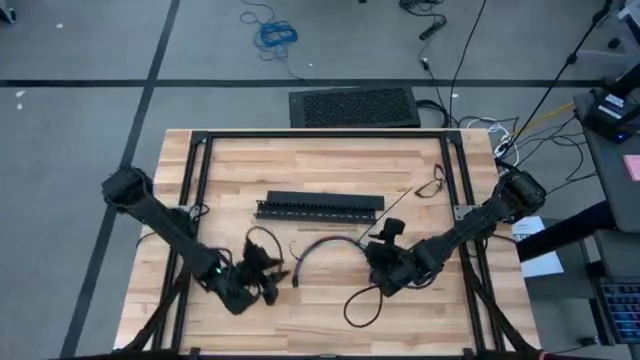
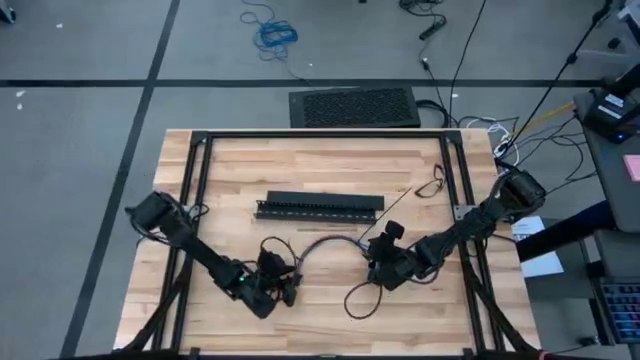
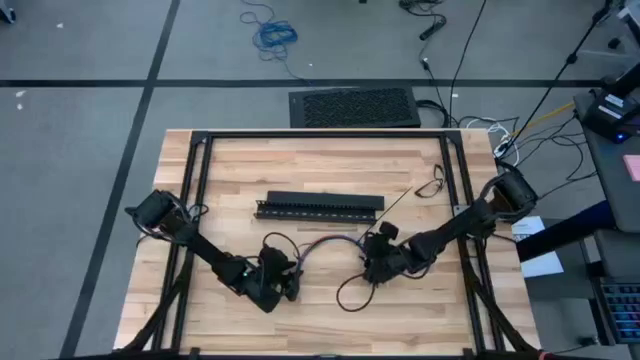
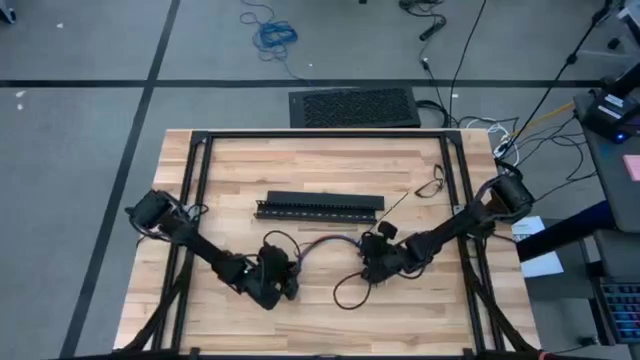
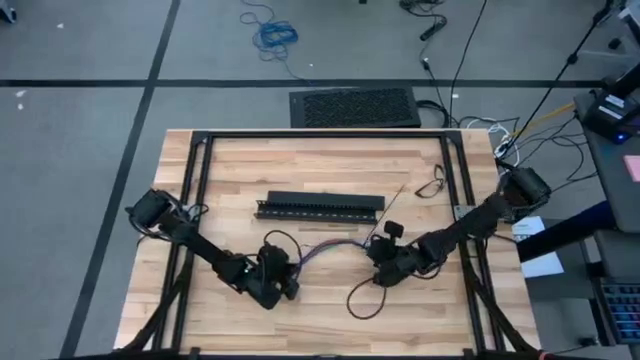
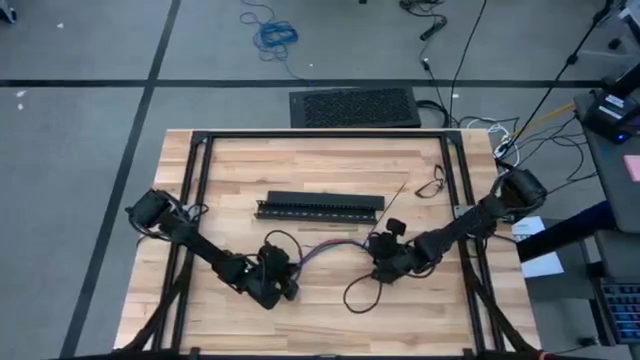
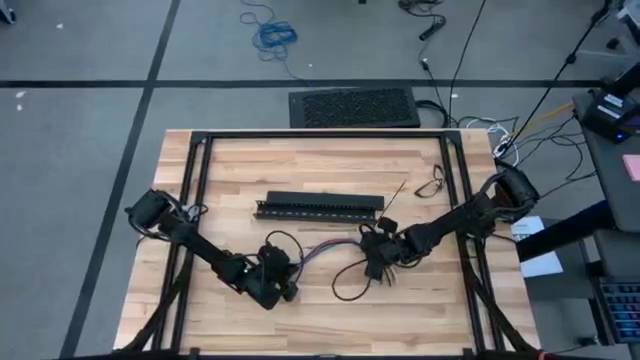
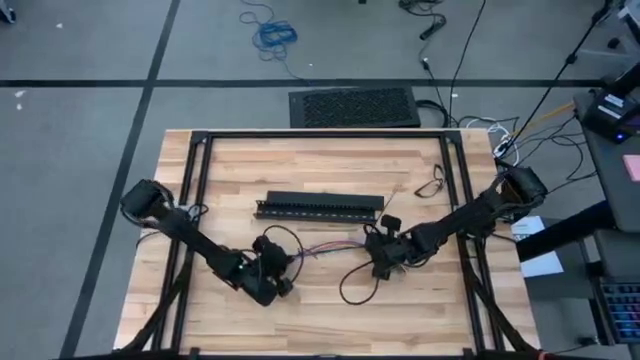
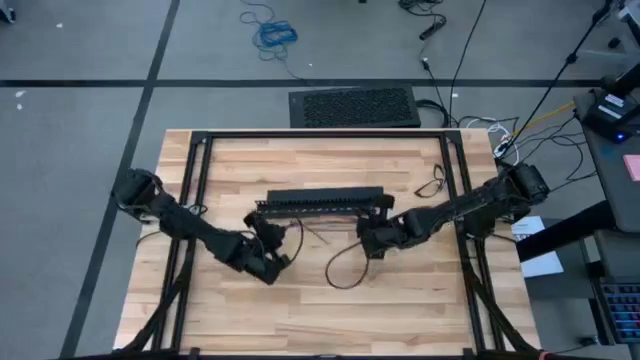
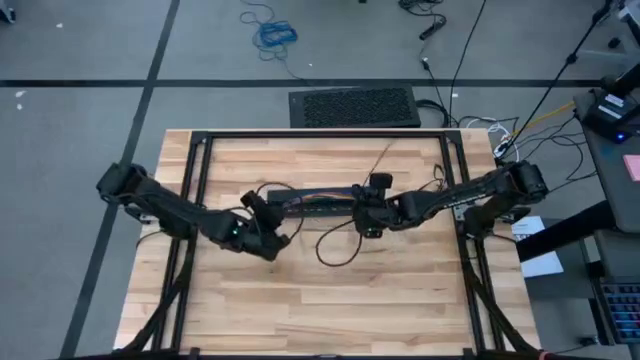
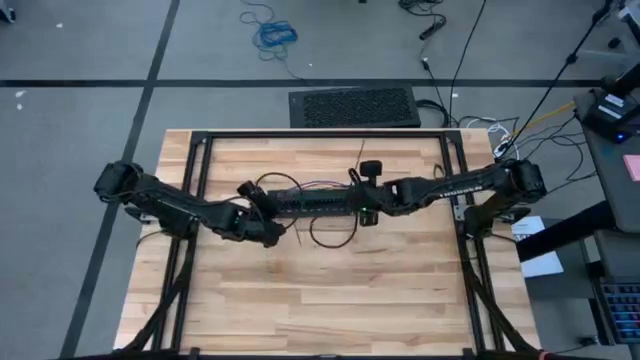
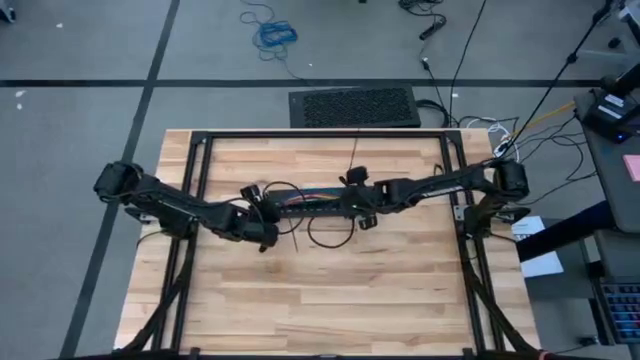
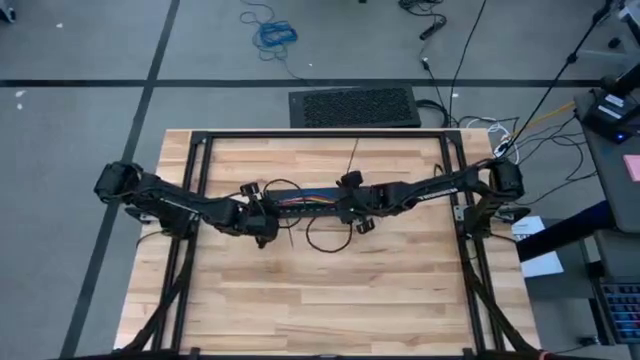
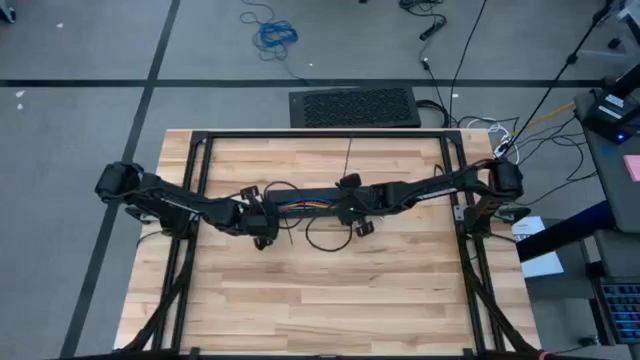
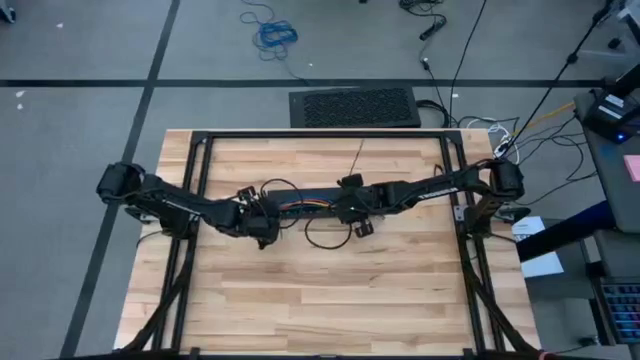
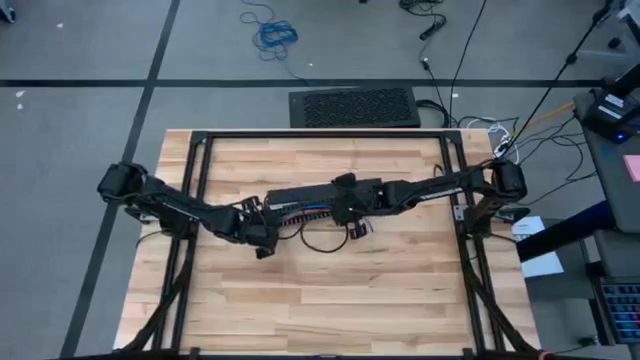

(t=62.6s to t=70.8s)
Task: Ziptie cables
Put the zip tied cables into the black cable duct

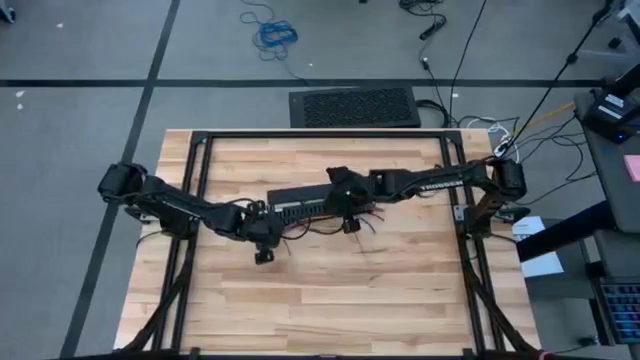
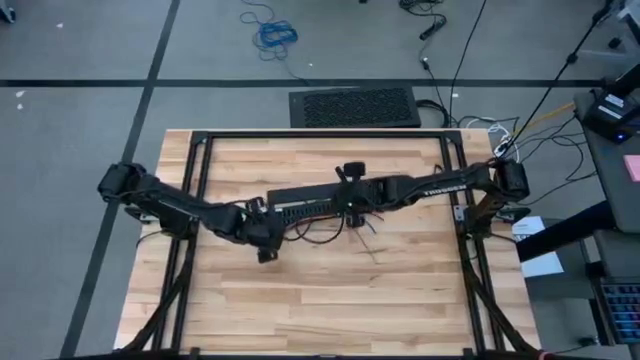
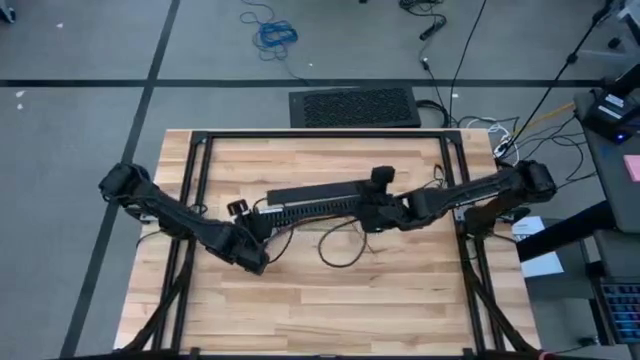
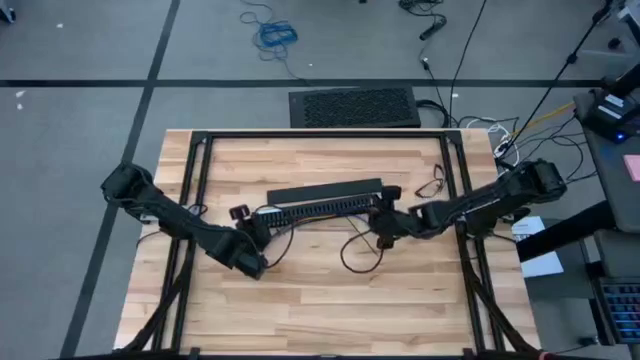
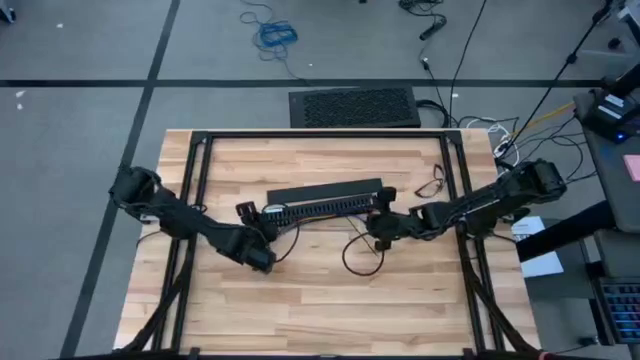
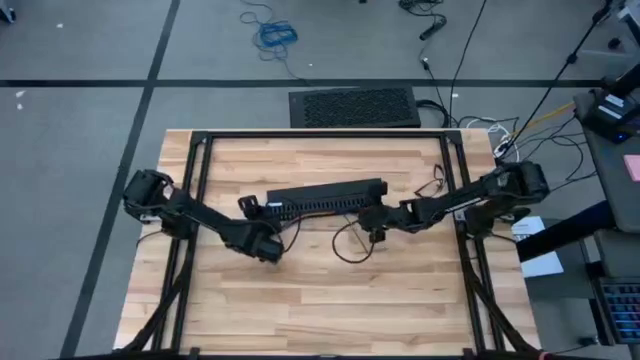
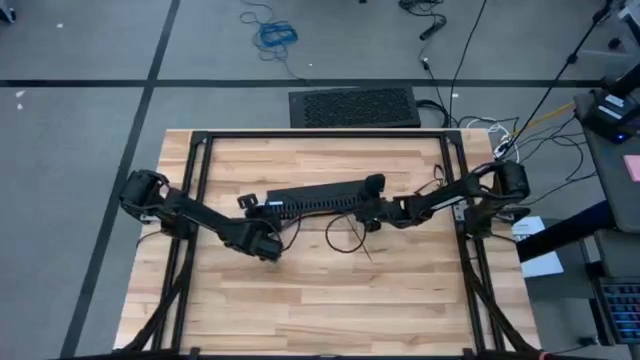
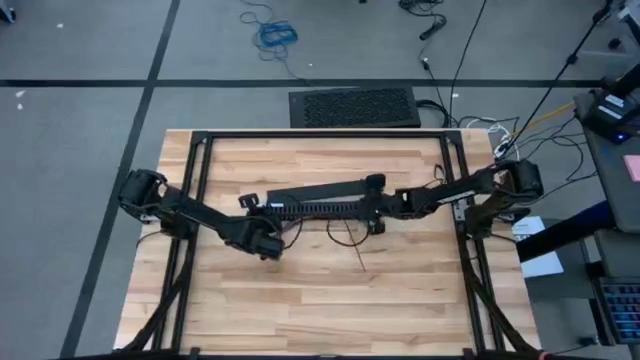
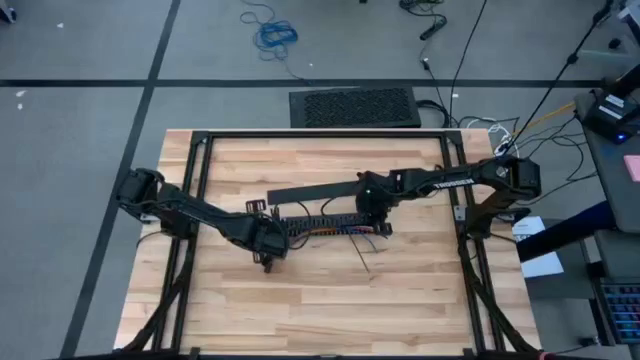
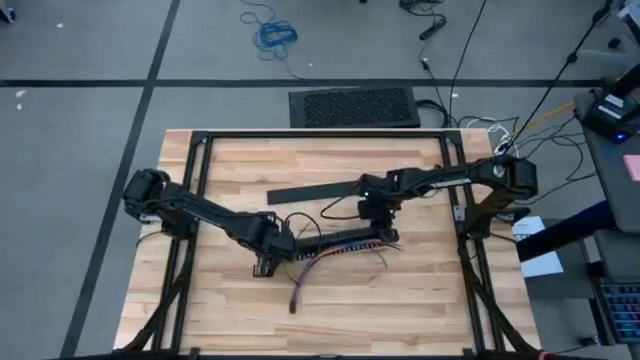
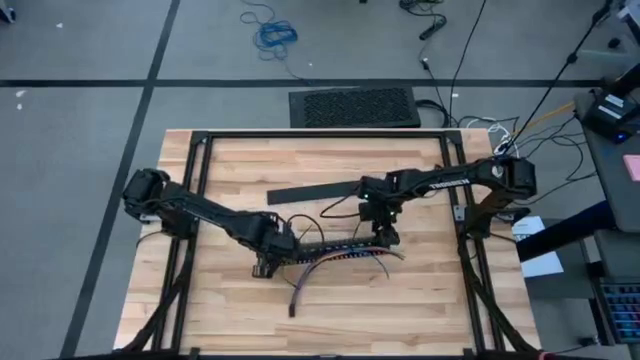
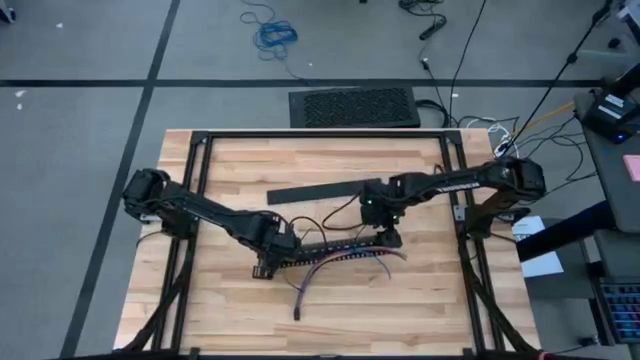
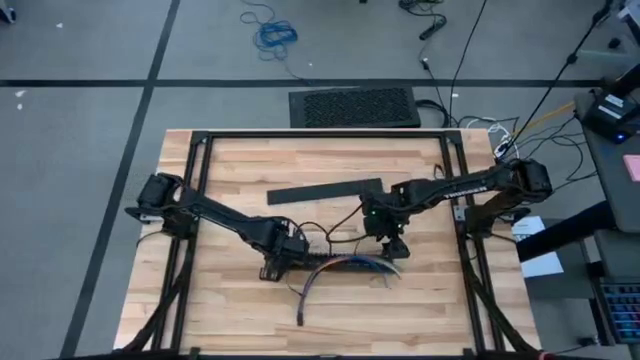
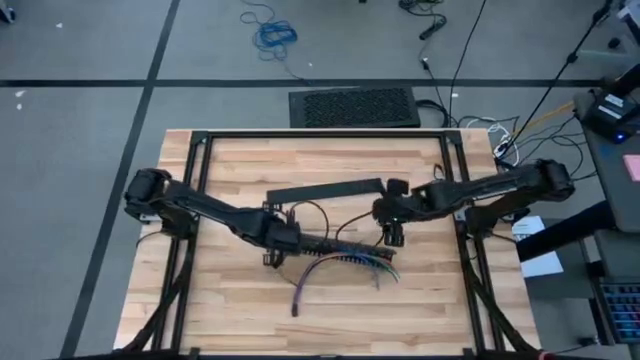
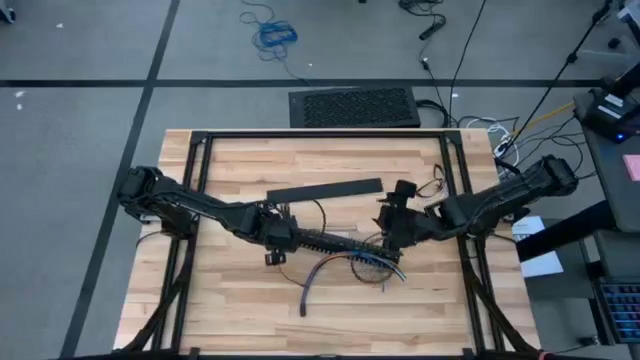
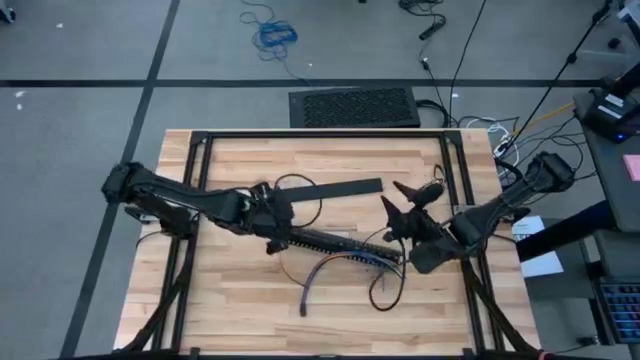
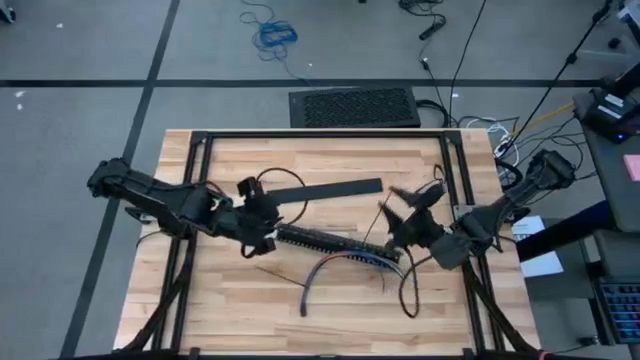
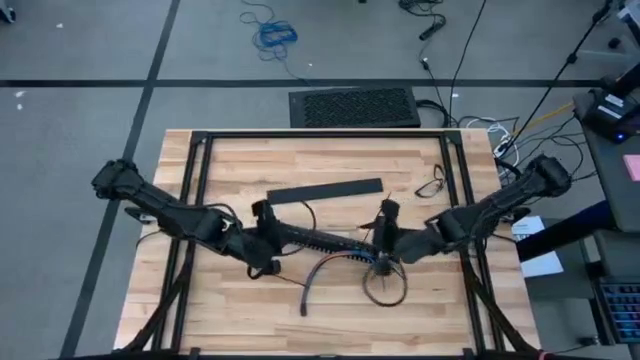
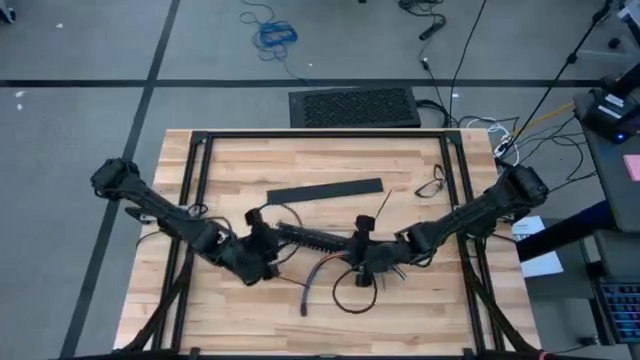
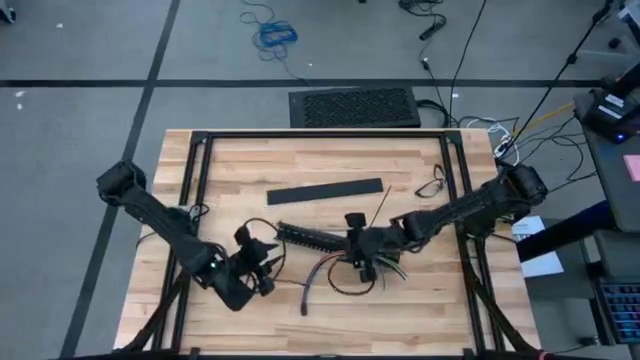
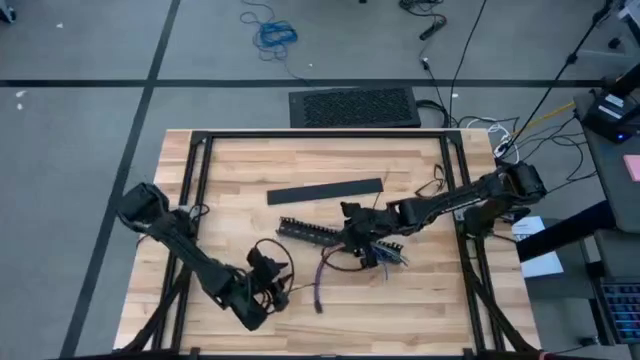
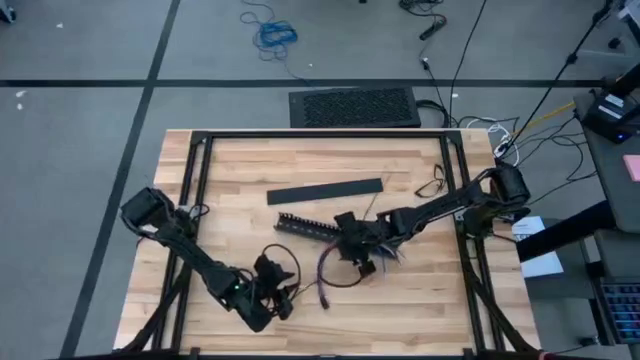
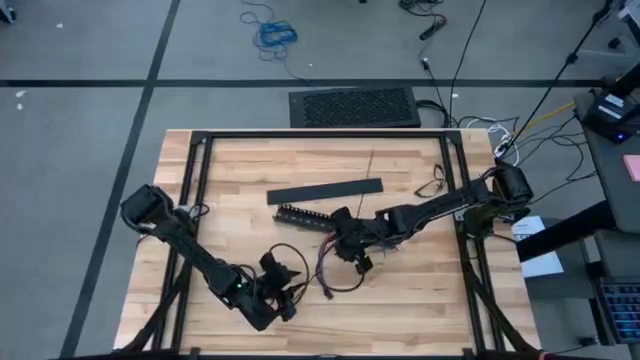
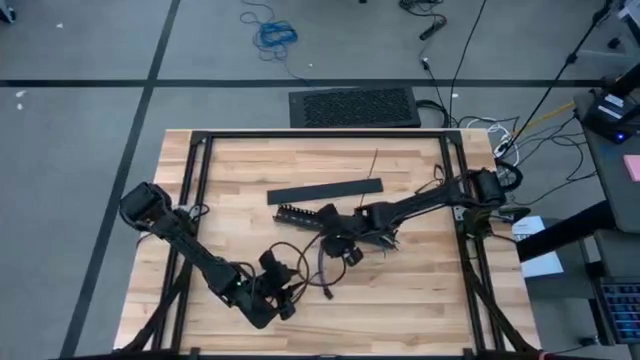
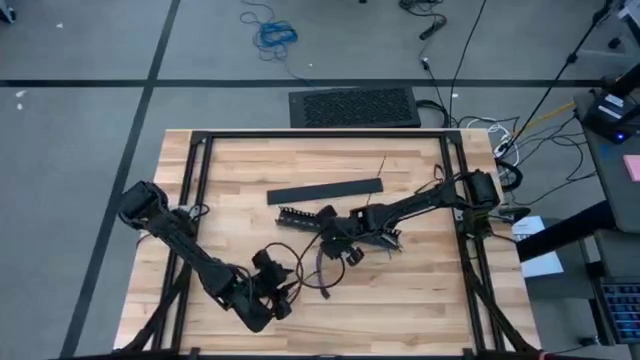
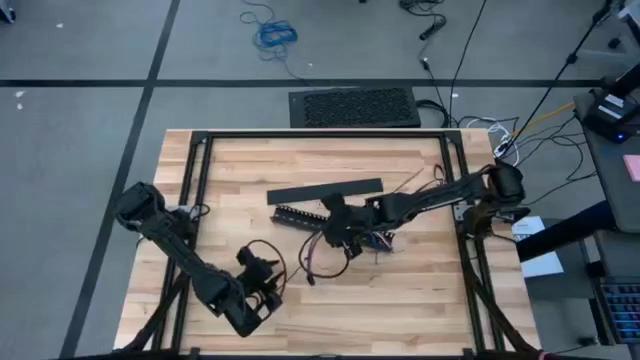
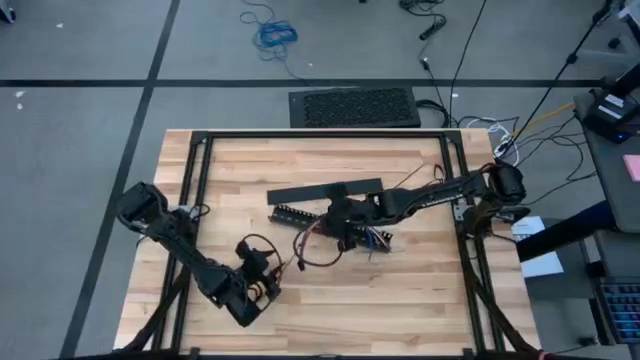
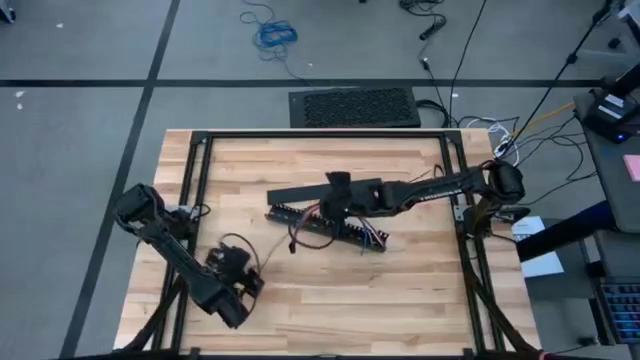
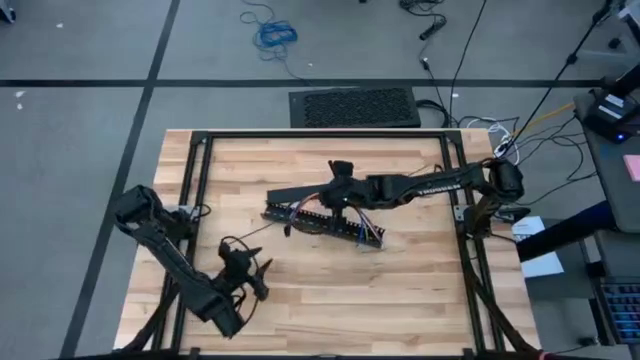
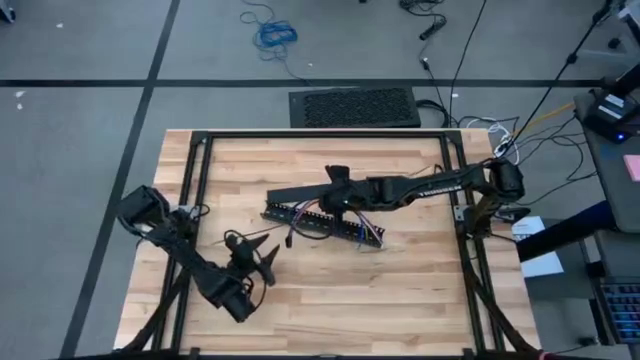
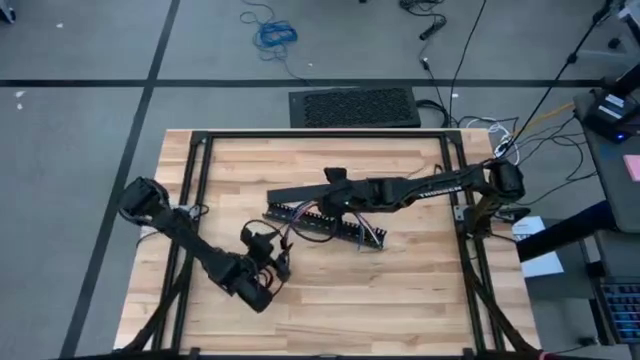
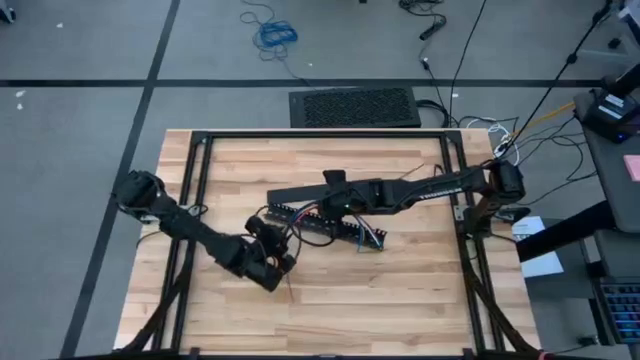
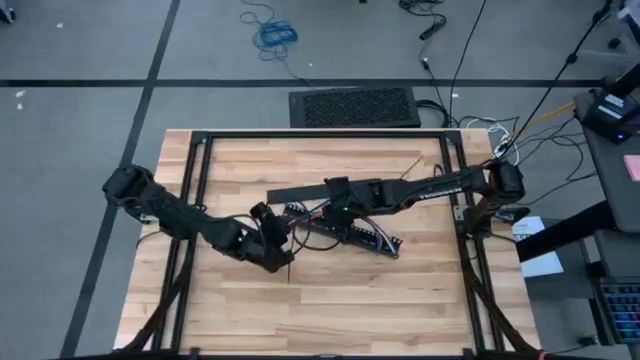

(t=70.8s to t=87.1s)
Put the zip tied cables into the black cable duct
